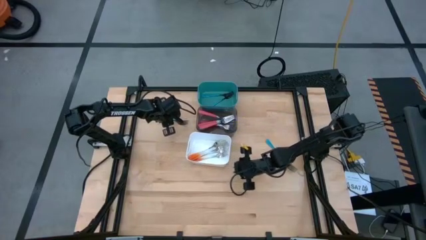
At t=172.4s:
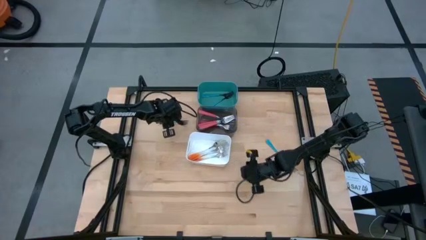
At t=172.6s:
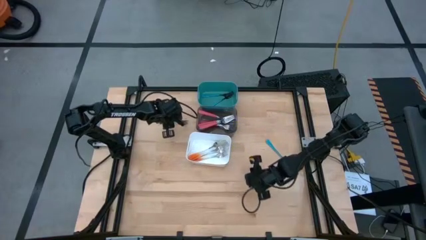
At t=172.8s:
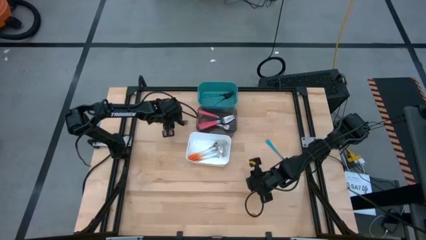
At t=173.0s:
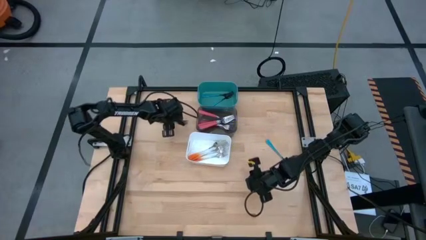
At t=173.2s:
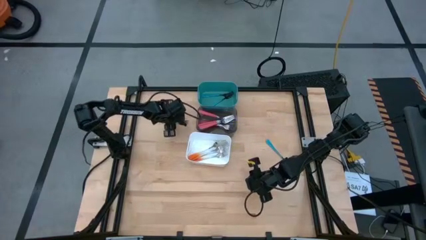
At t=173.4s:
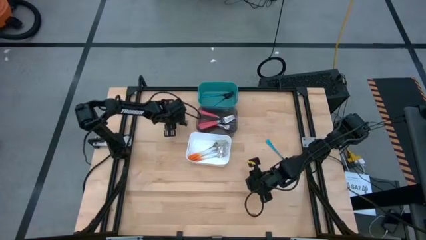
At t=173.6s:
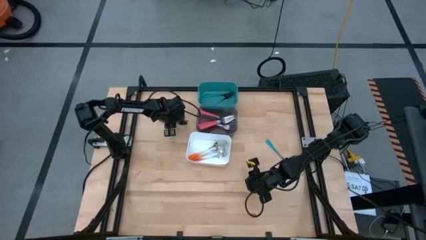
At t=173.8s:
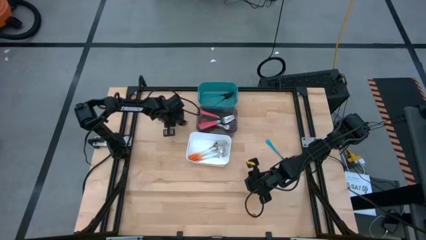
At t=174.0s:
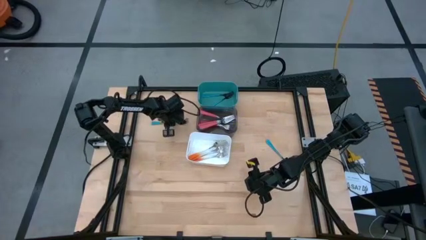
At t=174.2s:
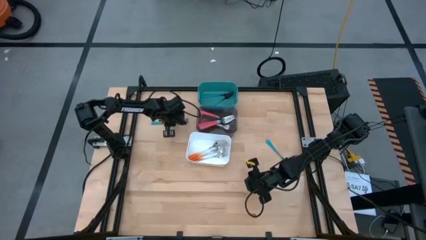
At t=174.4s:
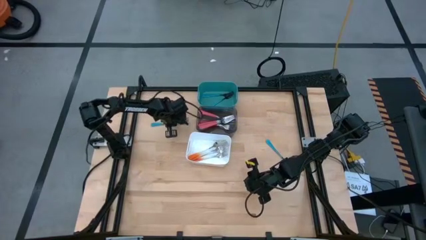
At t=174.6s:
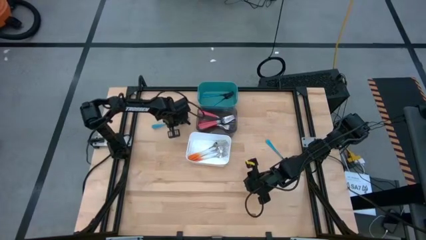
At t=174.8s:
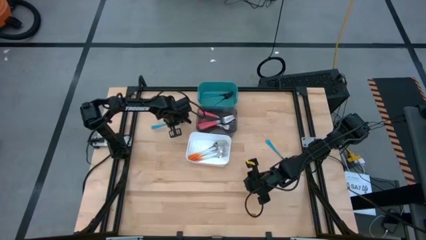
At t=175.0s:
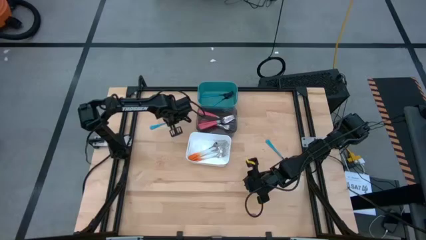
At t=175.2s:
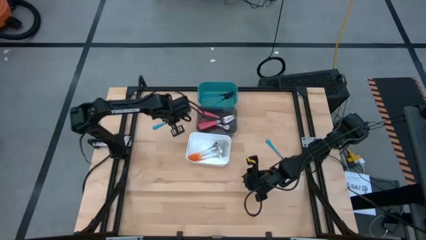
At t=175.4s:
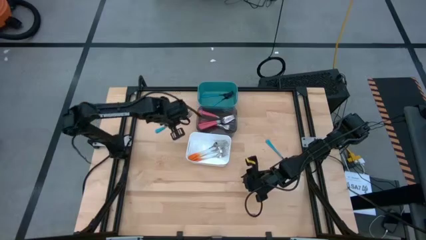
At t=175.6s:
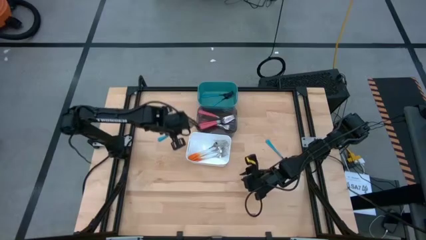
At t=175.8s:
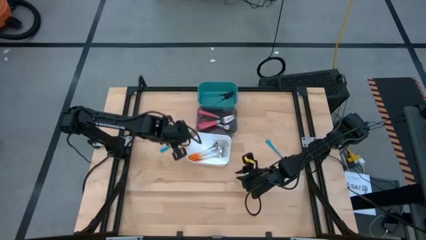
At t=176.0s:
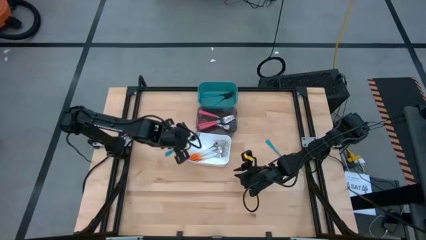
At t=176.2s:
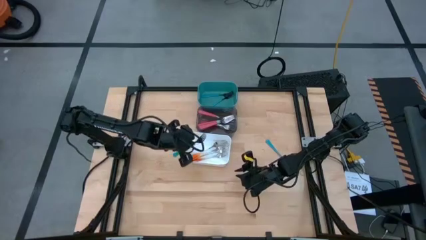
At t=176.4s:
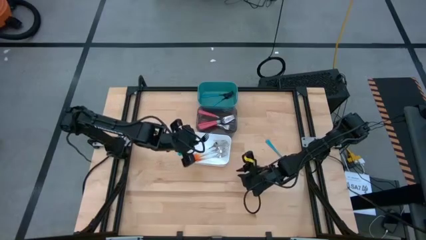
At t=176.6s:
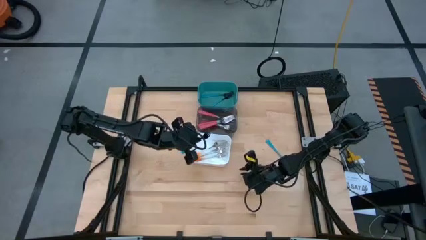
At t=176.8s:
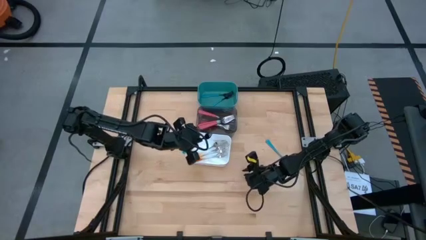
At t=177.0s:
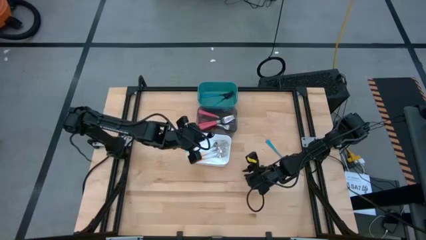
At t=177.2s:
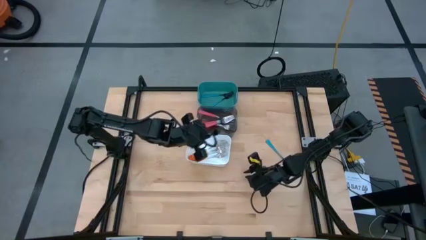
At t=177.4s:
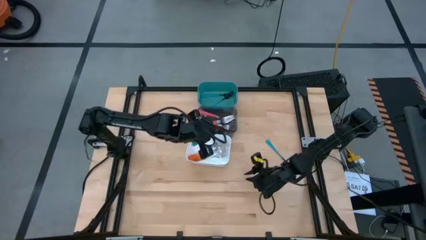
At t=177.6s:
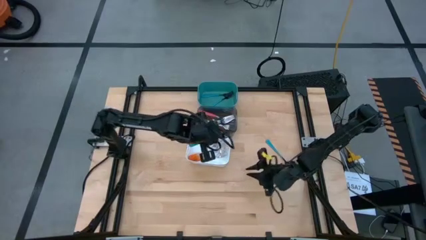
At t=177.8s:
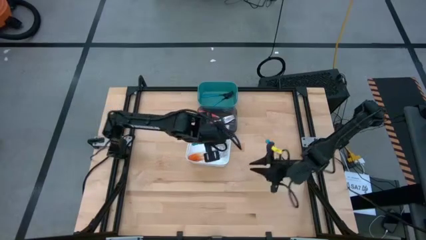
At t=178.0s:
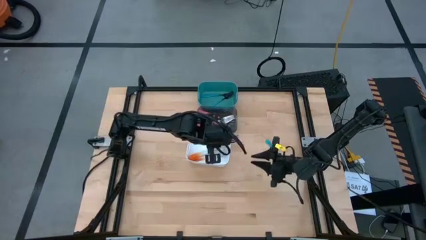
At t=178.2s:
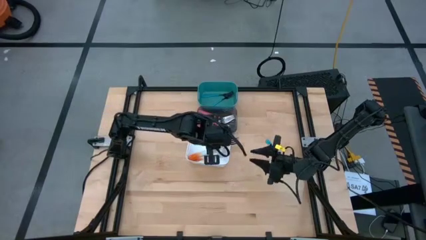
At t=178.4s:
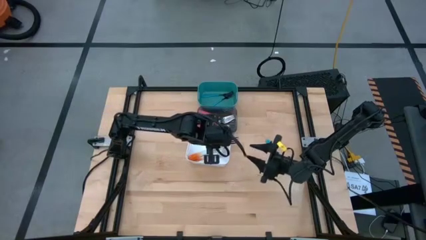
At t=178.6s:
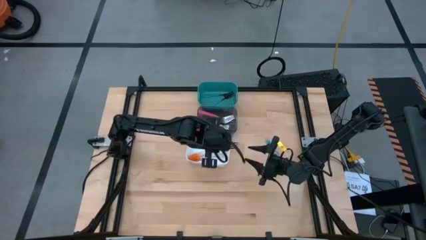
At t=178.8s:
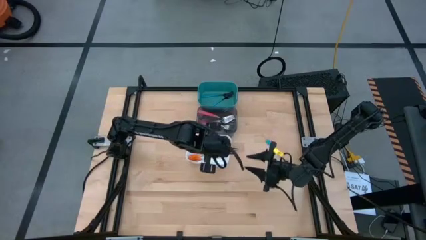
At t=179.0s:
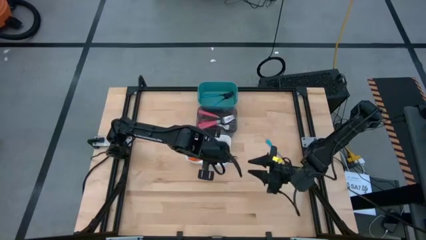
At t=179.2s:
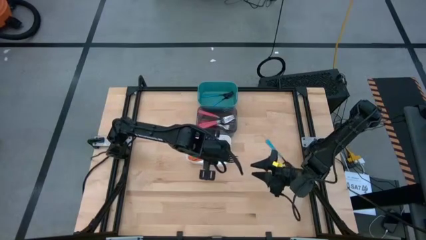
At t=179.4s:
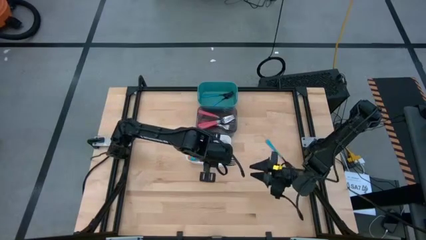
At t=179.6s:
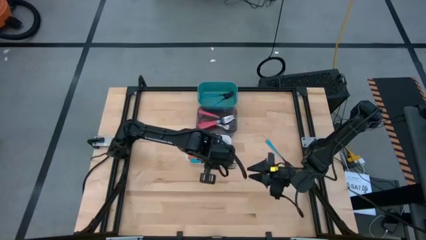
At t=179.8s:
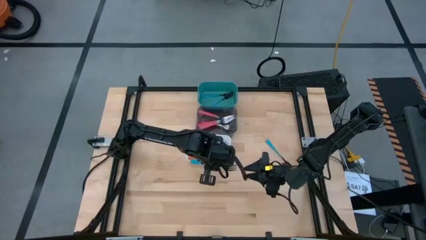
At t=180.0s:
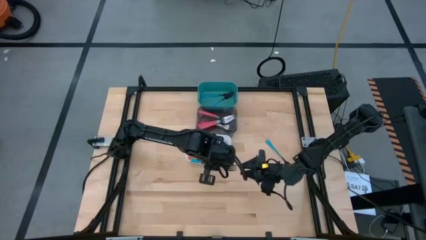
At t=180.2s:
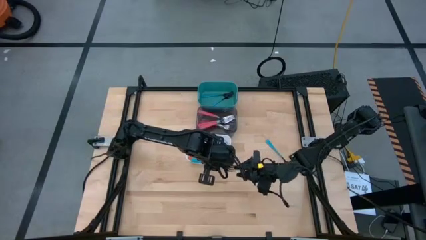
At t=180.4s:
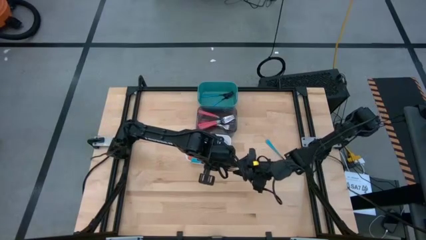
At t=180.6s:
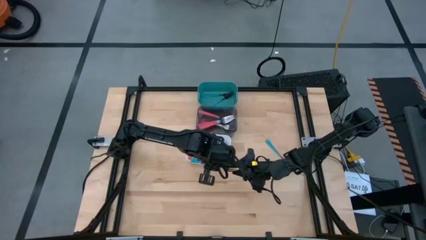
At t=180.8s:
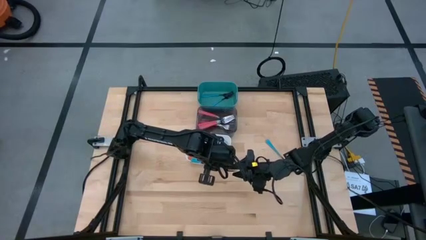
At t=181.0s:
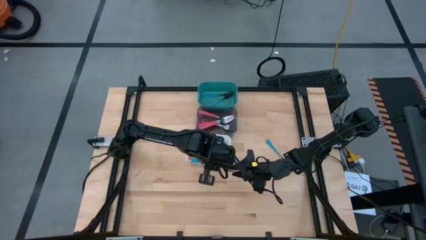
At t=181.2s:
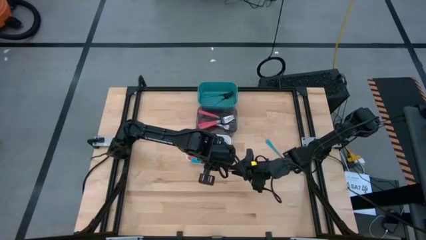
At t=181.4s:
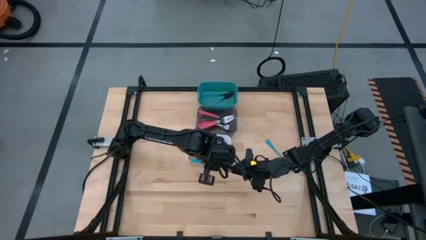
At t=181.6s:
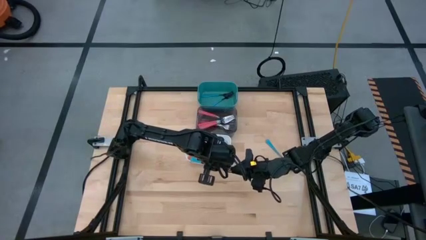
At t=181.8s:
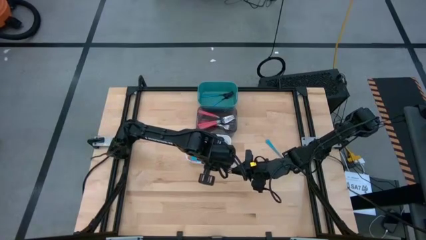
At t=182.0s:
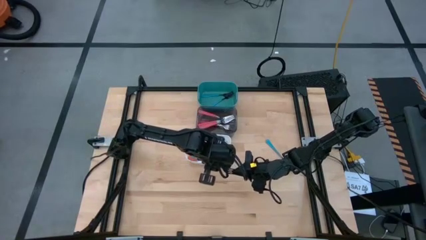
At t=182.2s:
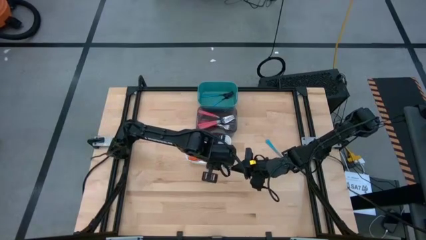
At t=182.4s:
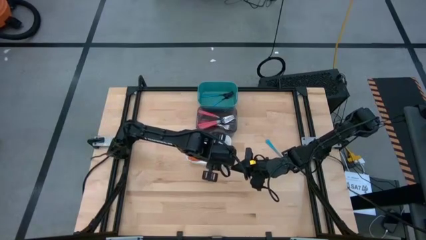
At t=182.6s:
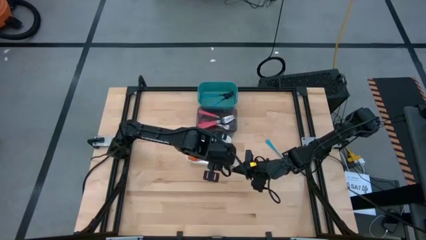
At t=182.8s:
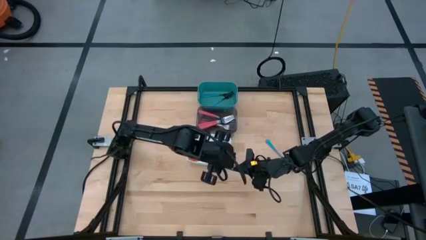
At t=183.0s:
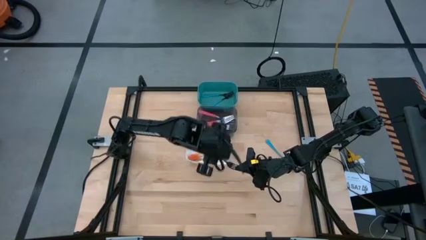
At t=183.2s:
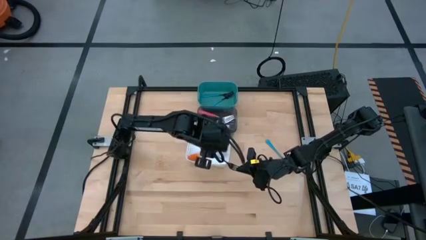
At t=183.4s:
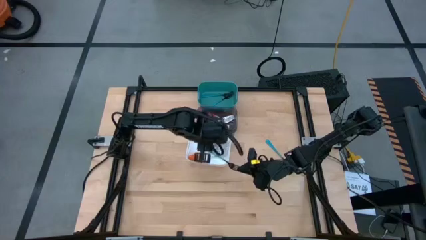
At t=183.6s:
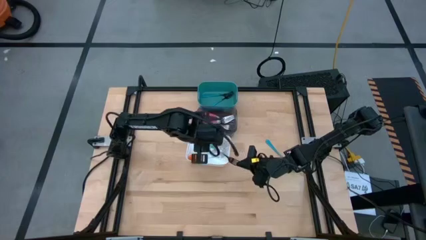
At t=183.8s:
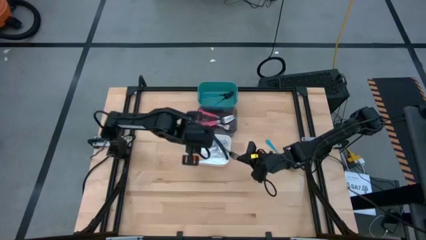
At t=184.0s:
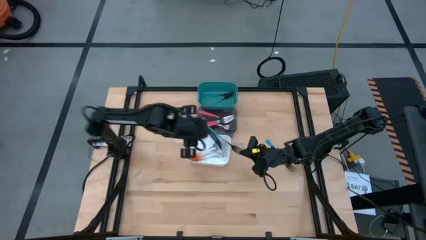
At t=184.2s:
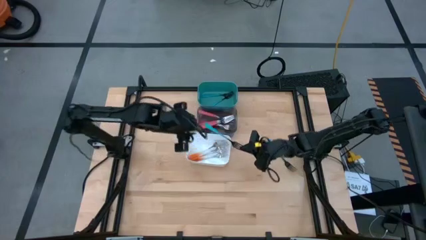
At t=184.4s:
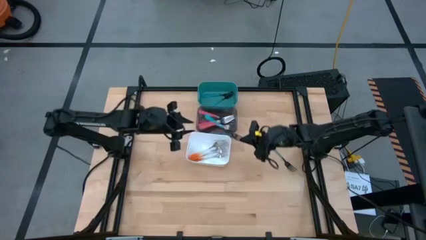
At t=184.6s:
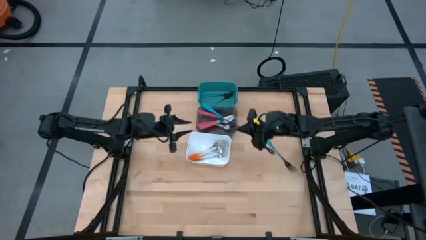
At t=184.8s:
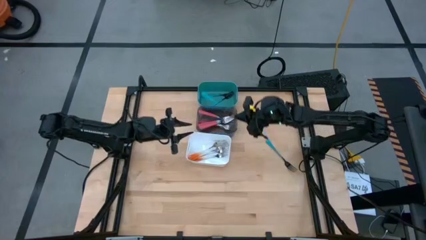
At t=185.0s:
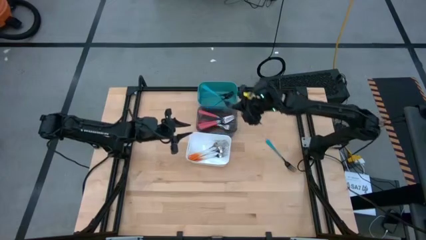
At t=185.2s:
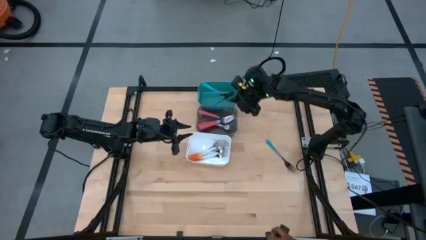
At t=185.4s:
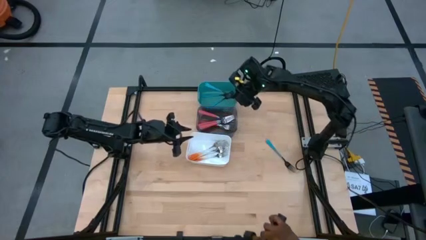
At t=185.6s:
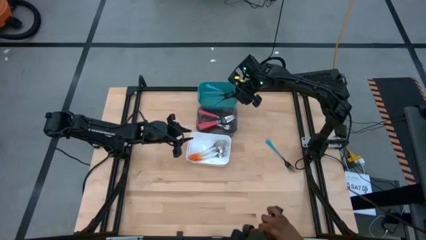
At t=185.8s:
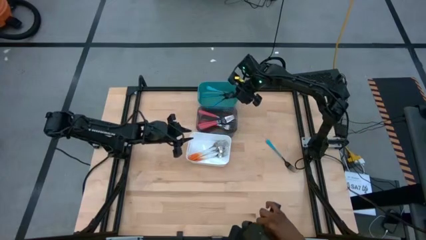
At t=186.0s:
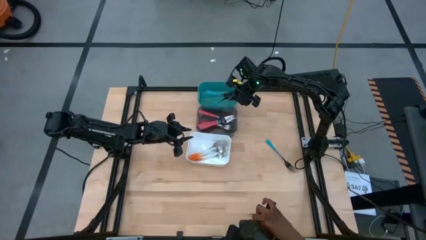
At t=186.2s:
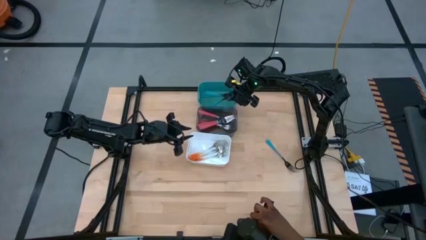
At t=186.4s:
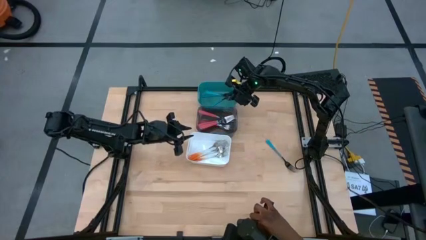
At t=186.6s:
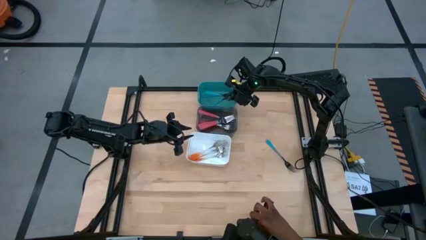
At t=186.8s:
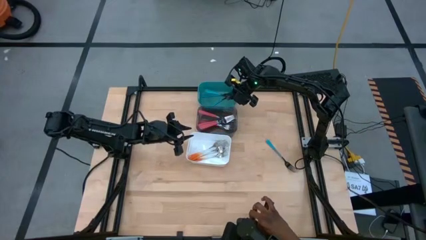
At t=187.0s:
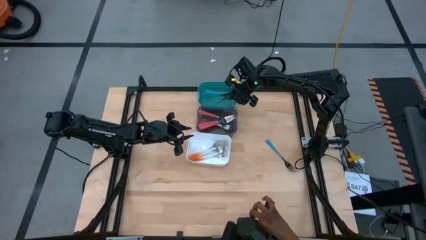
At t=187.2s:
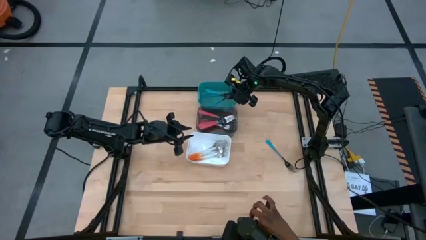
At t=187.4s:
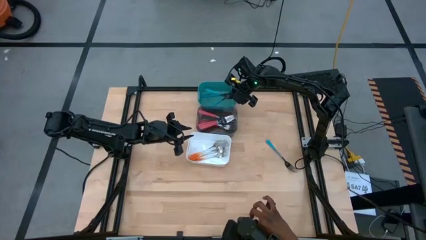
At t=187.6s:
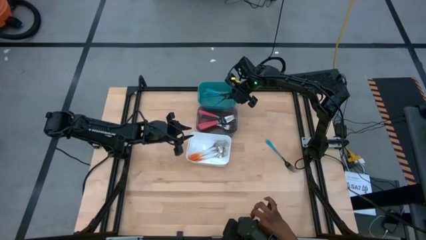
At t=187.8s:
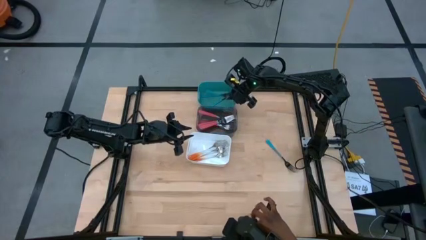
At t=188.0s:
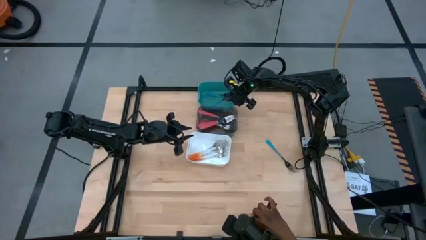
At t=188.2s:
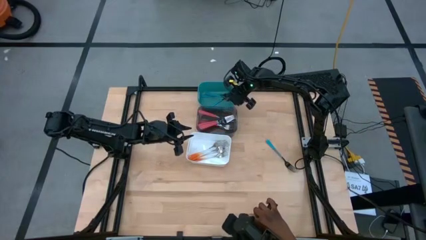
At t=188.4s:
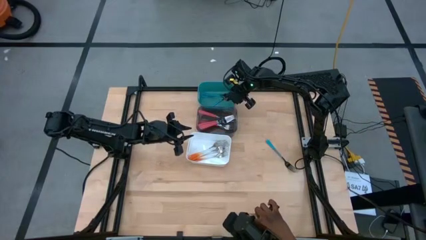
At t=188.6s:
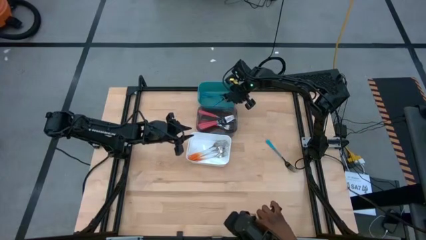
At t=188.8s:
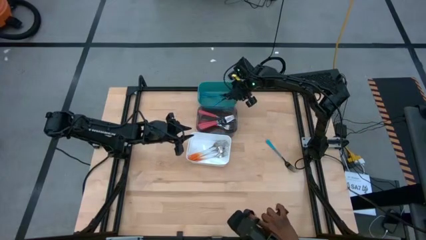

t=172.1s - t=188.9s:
Task: Sort silverware by color (type)
Put the left blue fork into the blue bin
